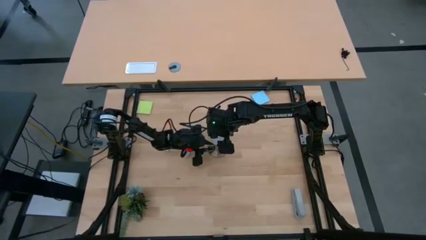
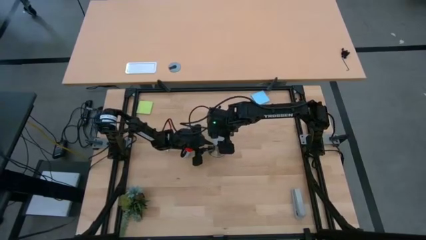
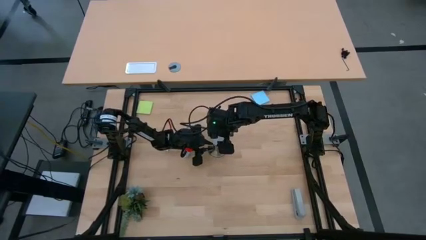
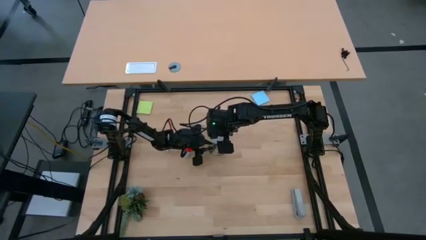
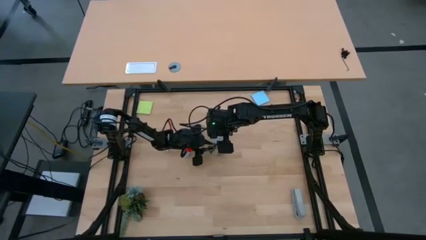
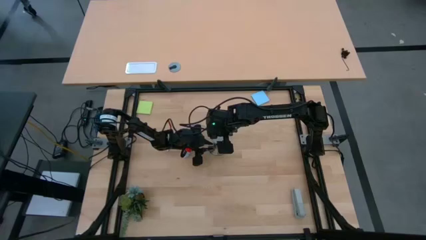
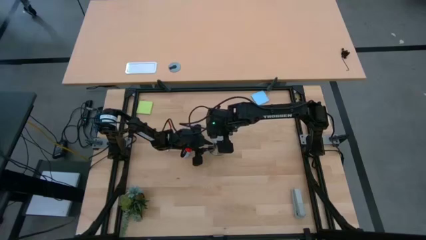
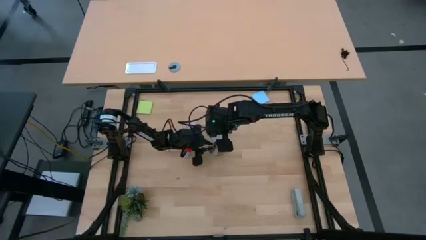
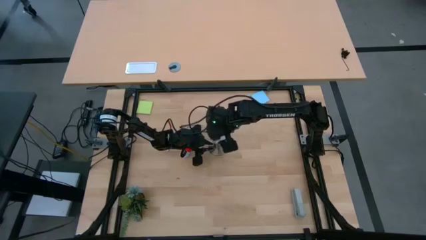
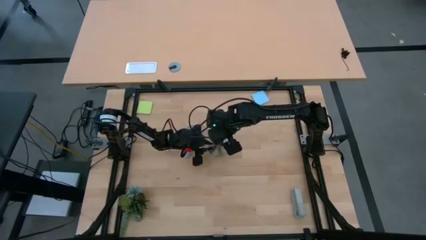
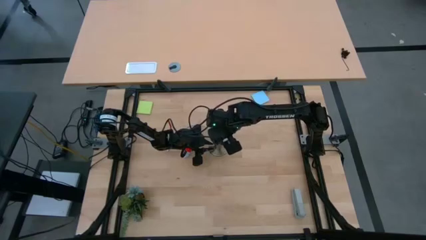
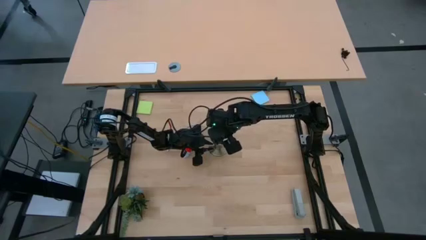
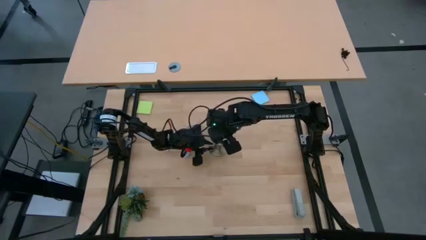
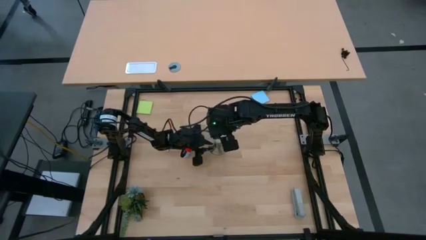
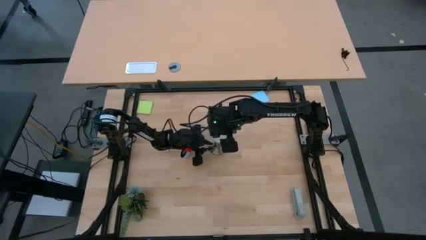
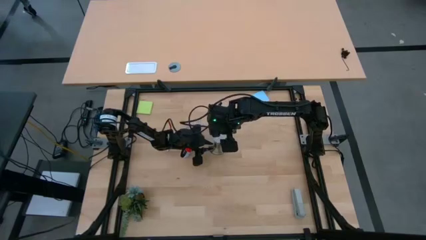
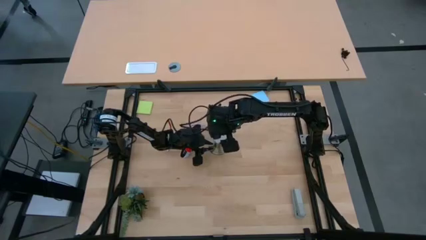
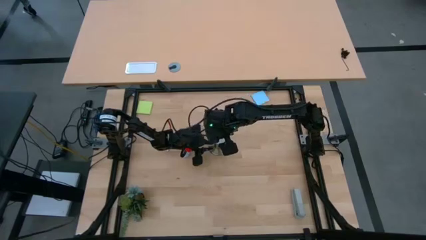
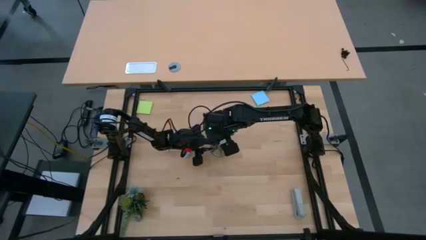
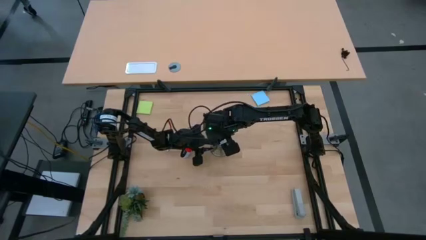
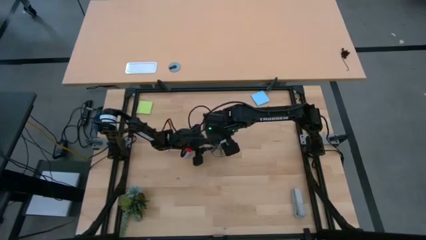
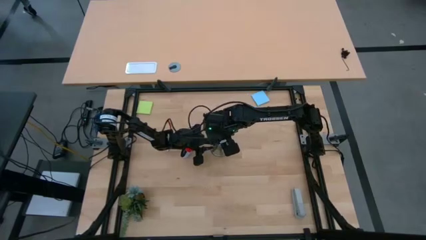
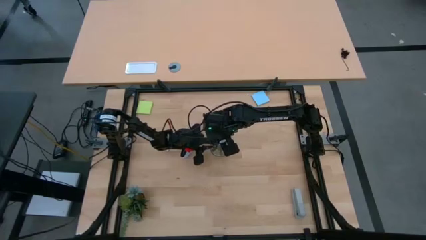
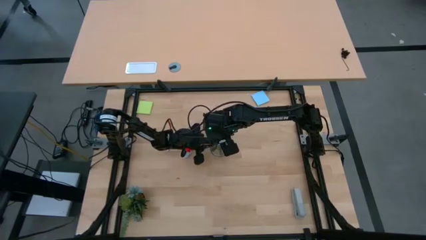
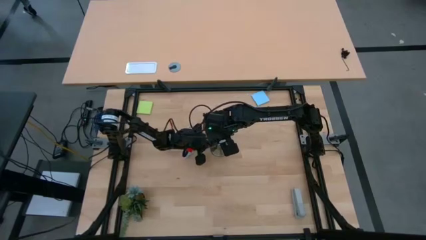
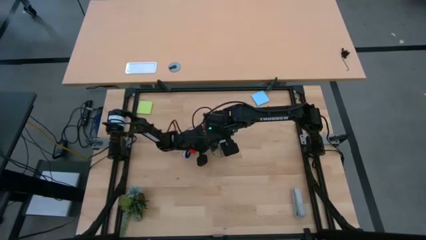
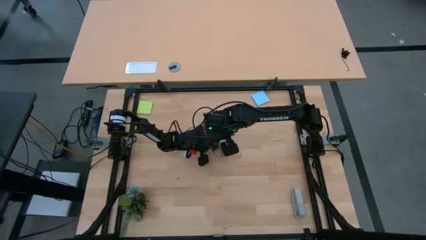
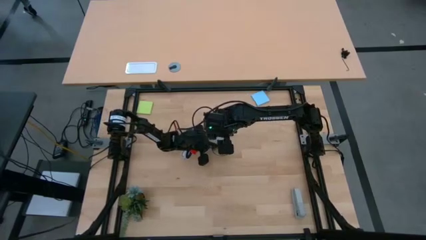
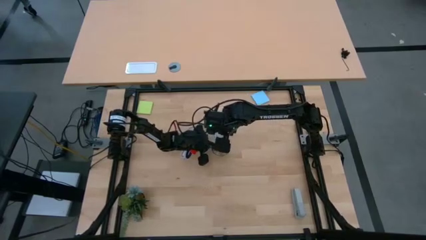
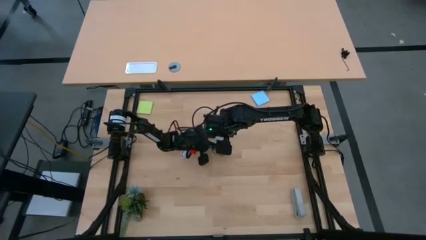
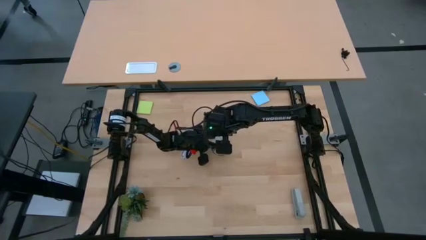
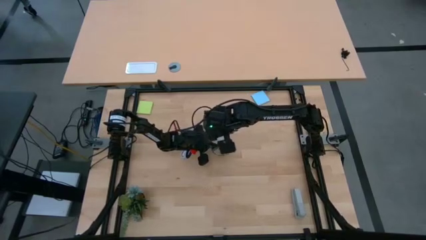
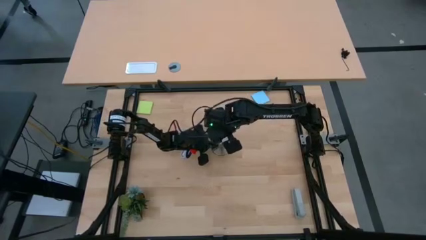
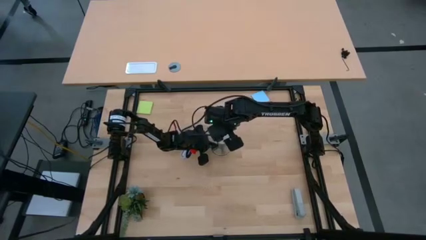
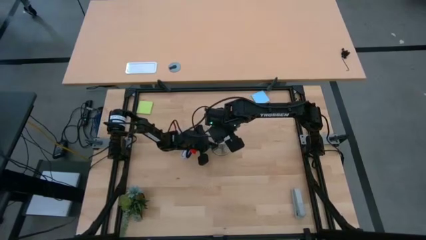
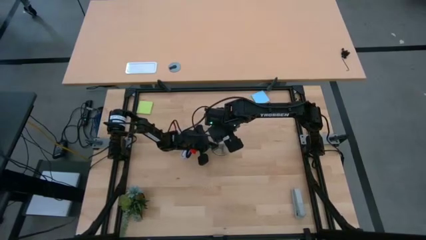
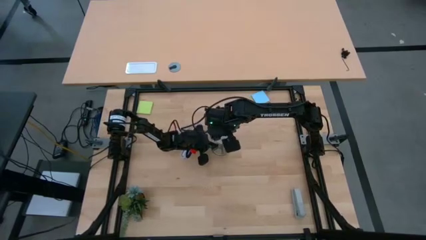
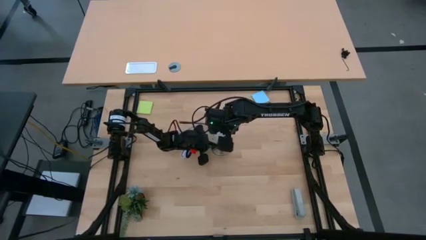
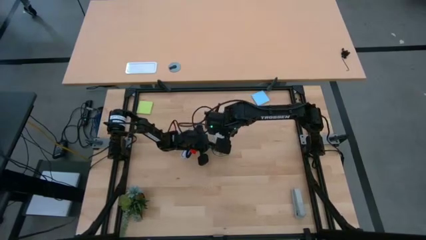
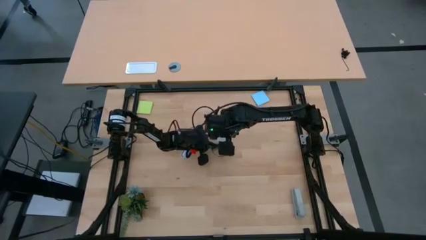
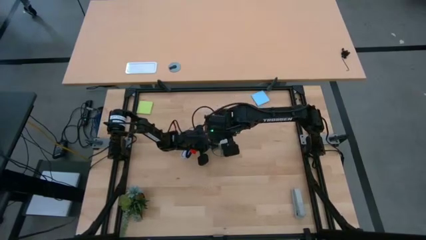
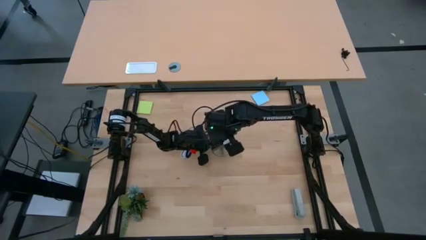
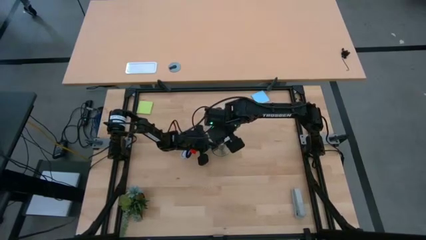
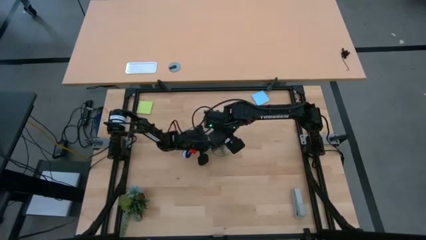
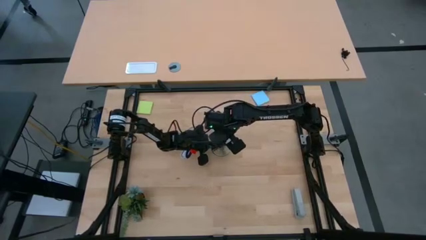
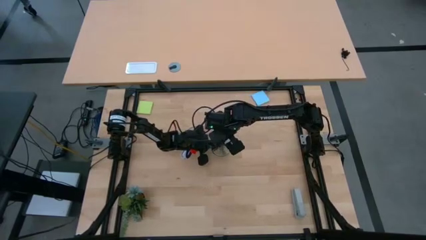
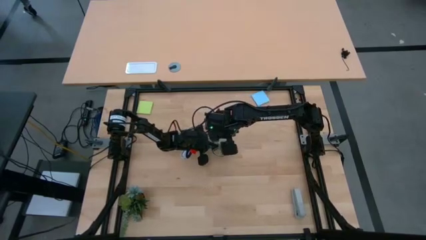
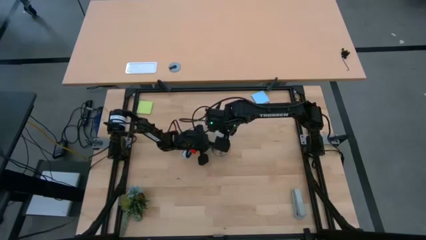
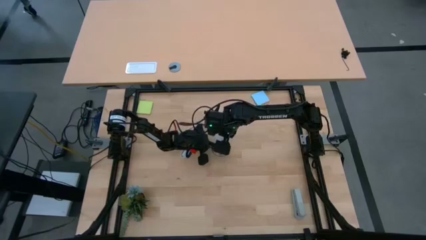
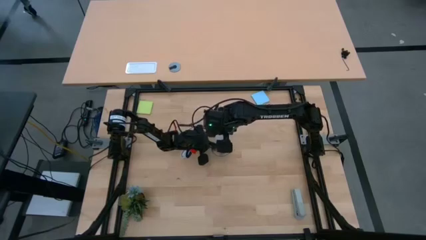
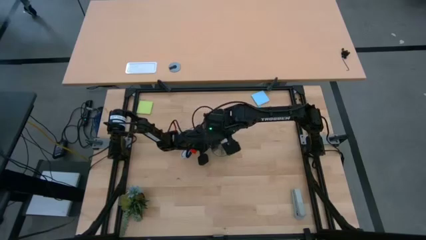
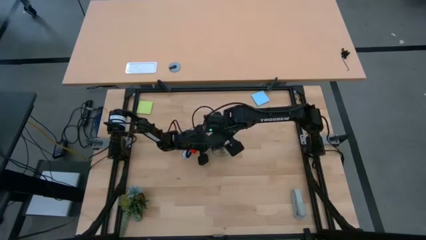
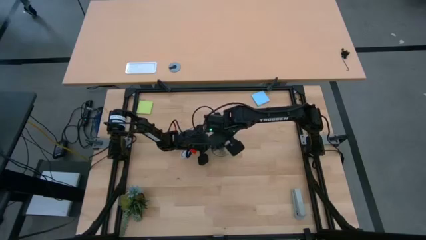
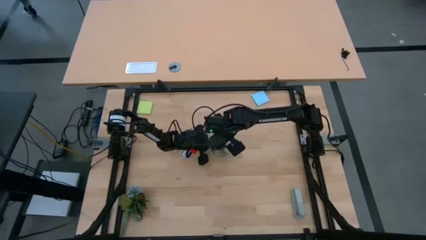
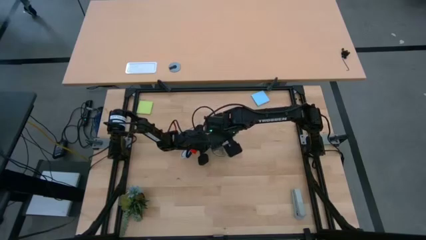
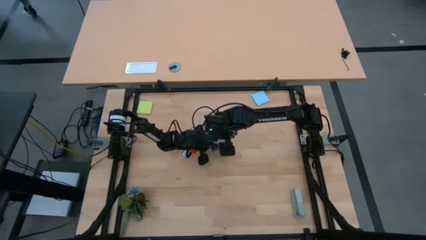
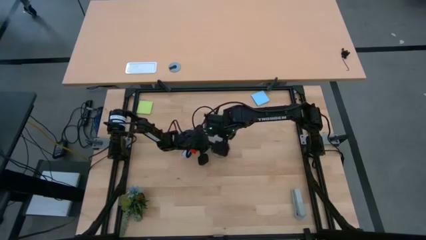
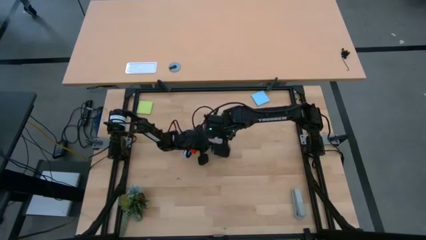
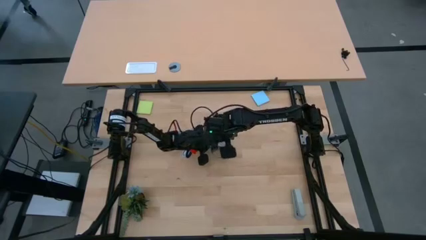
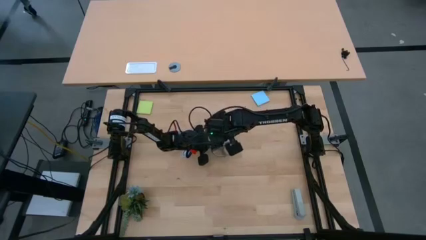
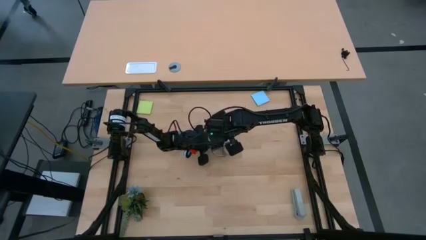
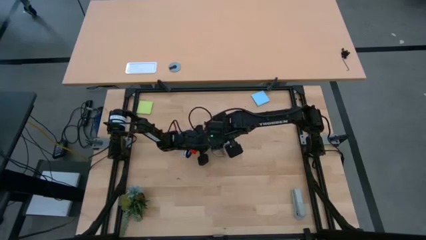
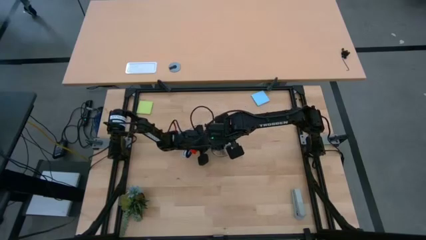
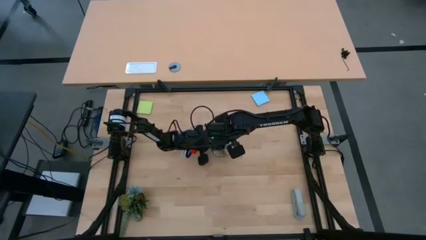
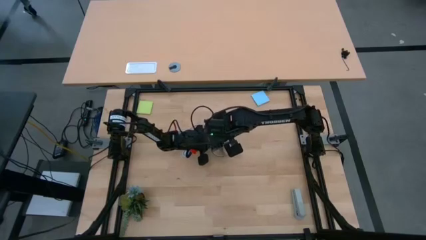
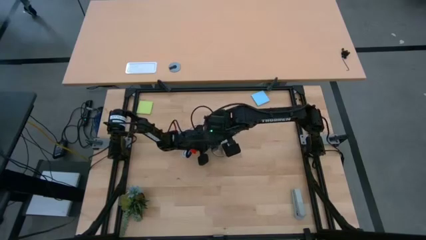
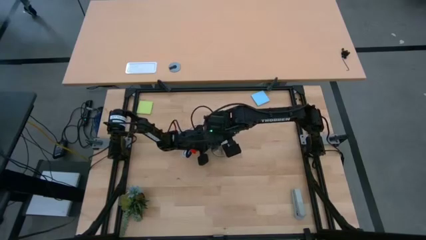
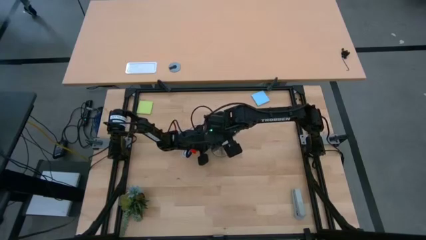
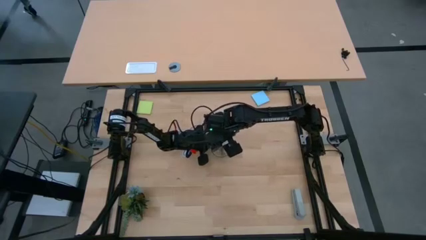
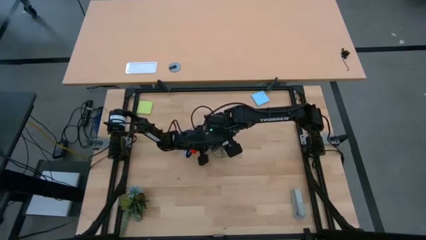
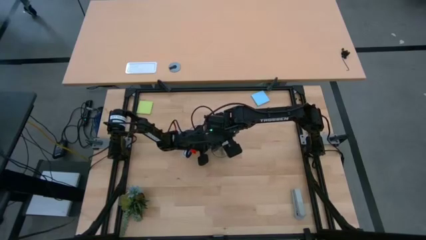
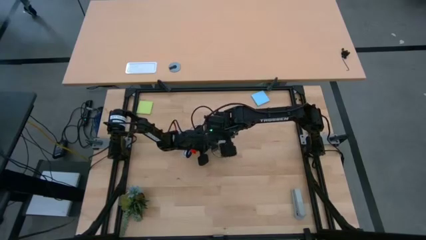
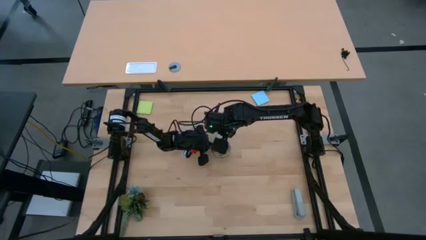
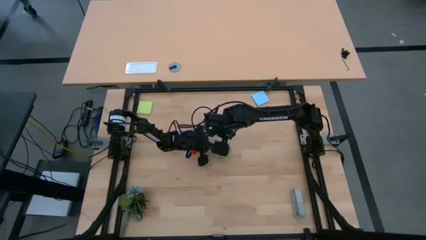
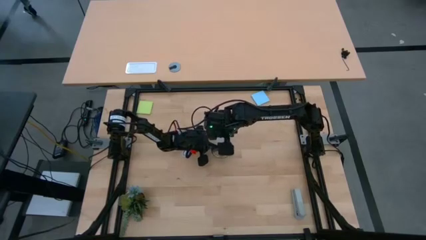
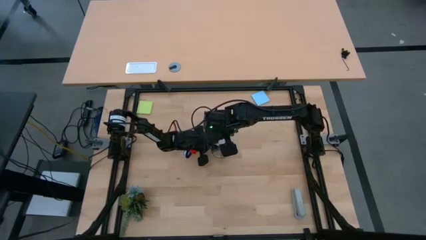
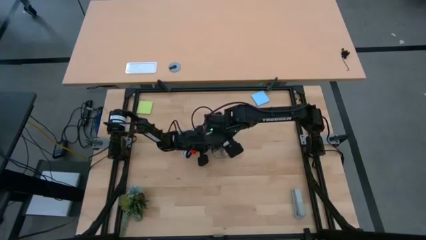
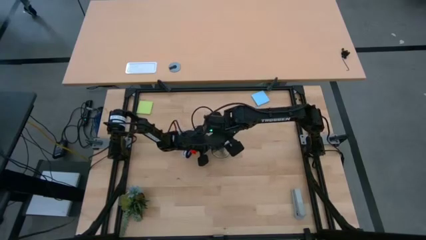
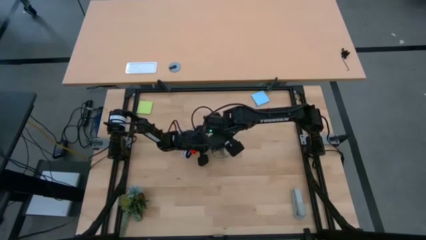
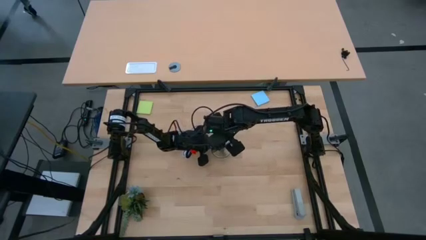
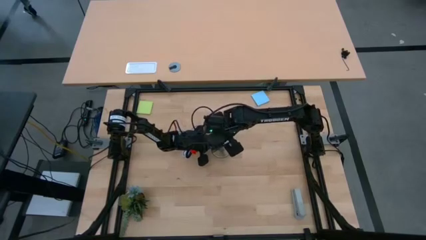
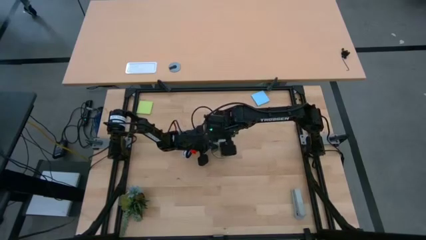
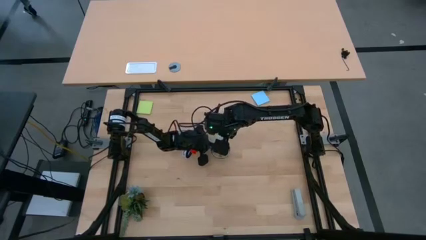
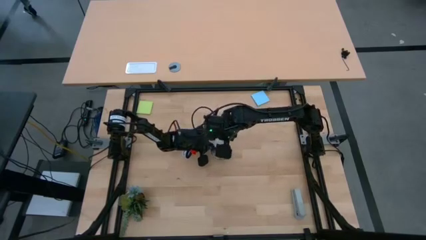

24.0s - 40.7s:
Task: Screw lightbulb
Insert the light bulb into the lamp
